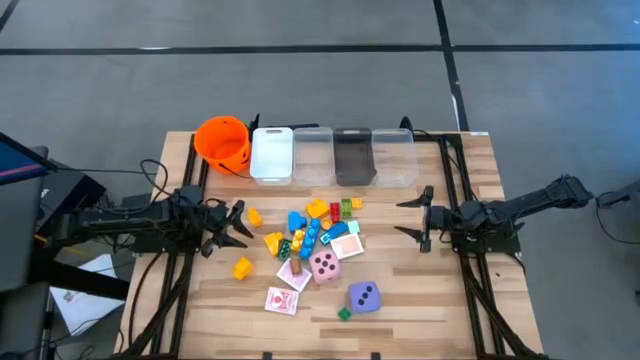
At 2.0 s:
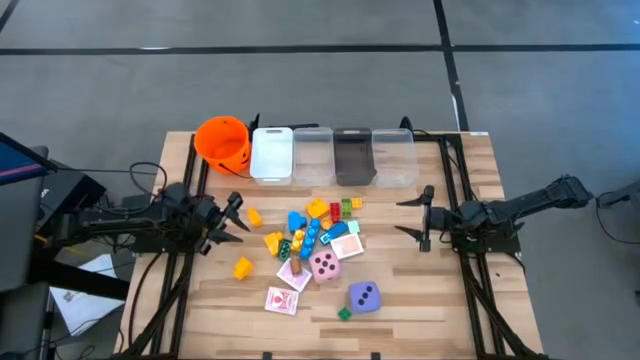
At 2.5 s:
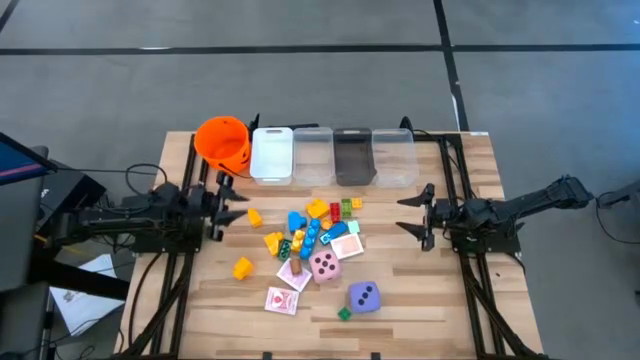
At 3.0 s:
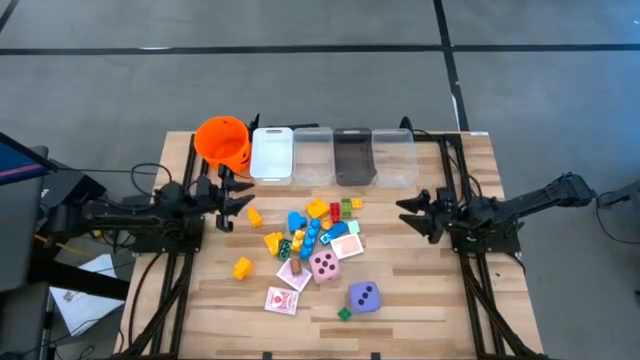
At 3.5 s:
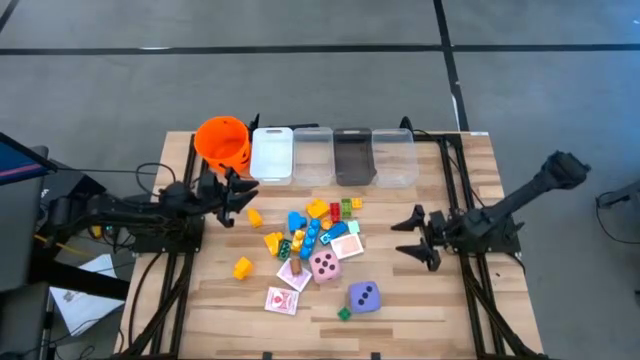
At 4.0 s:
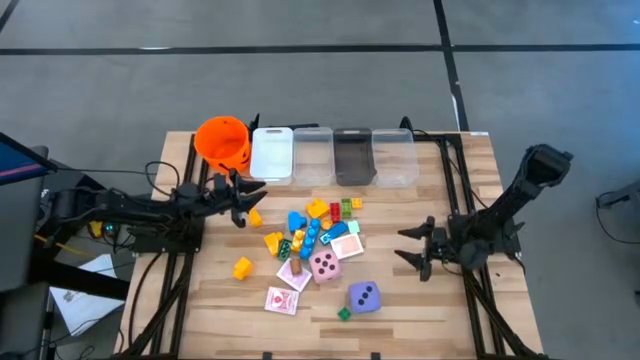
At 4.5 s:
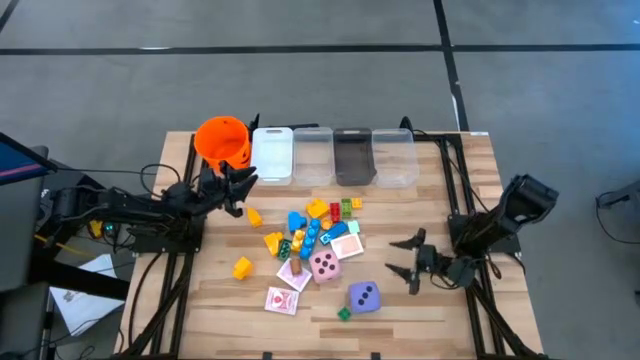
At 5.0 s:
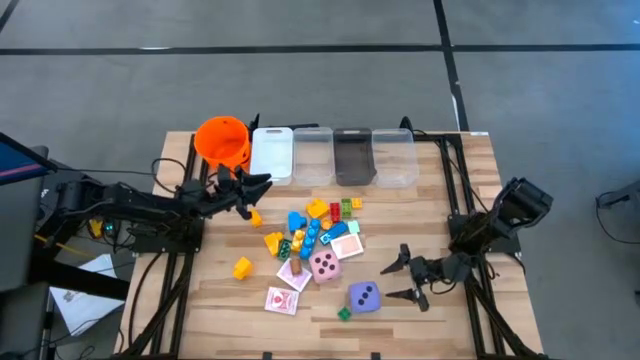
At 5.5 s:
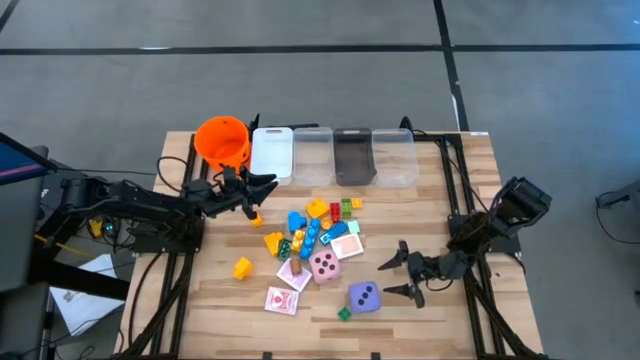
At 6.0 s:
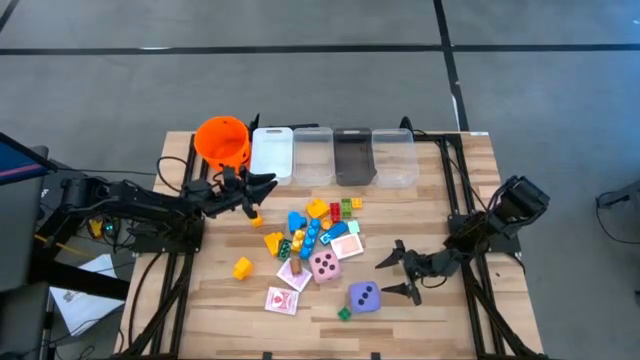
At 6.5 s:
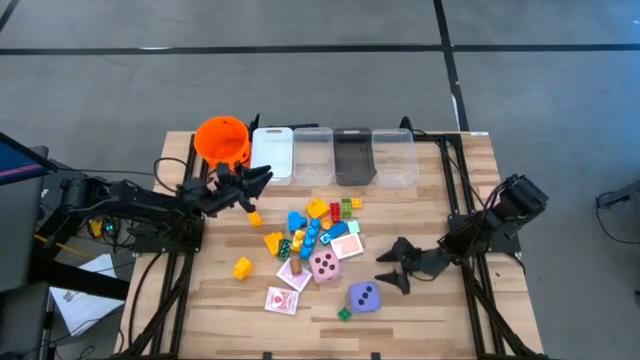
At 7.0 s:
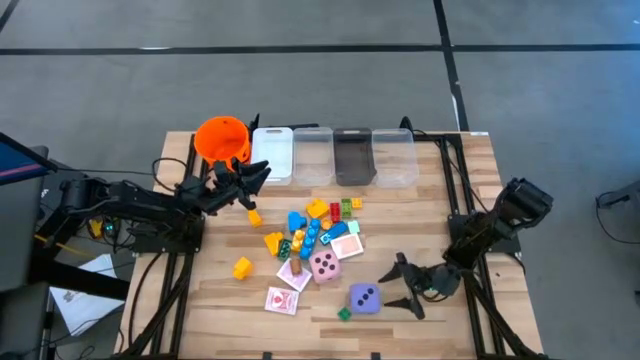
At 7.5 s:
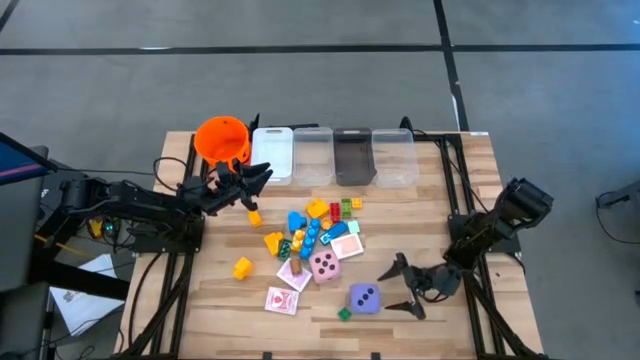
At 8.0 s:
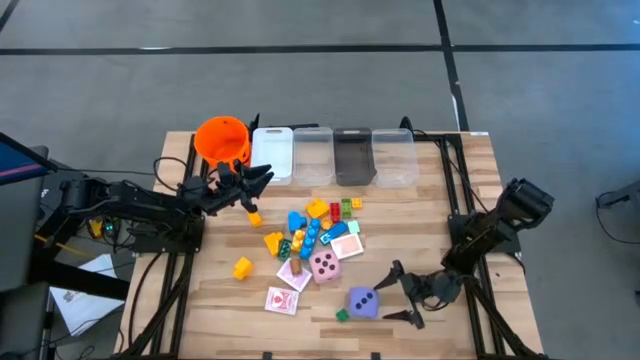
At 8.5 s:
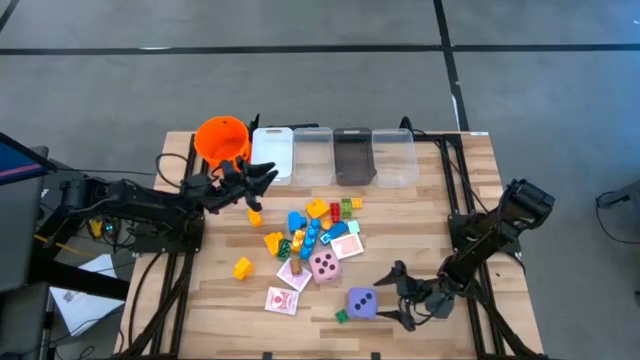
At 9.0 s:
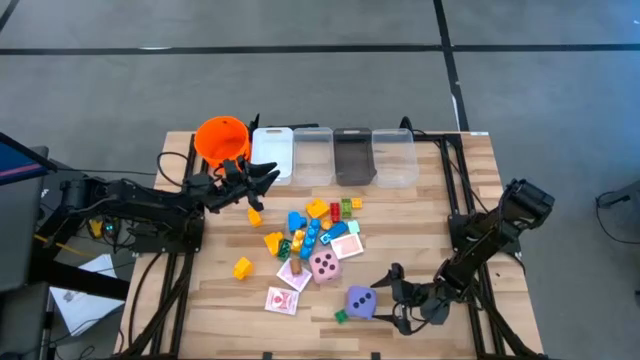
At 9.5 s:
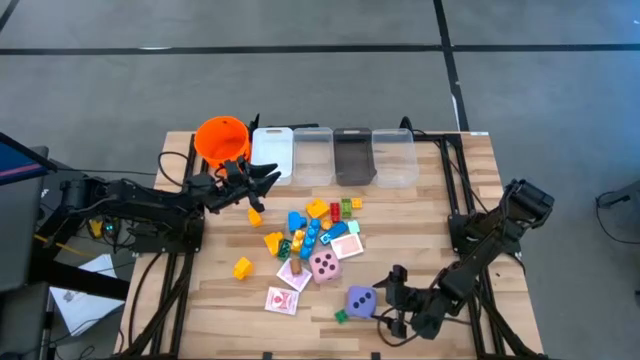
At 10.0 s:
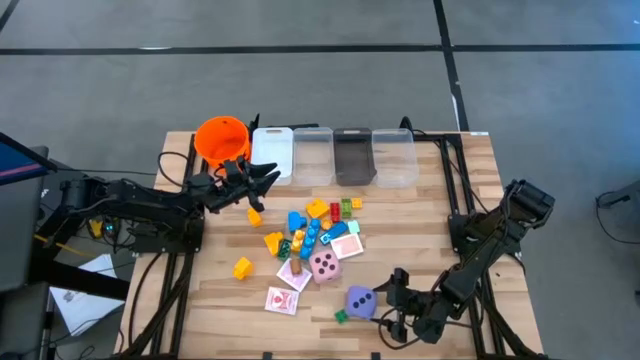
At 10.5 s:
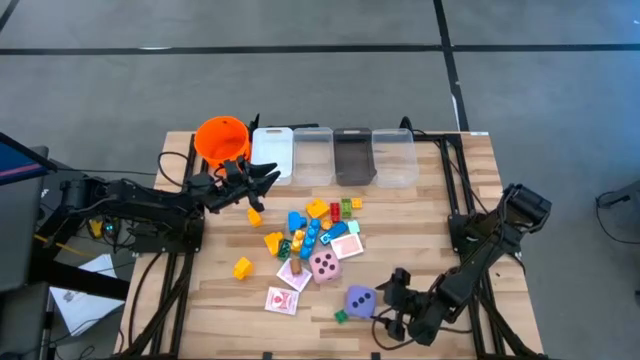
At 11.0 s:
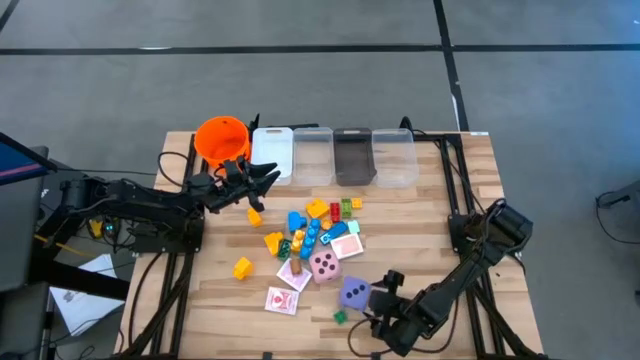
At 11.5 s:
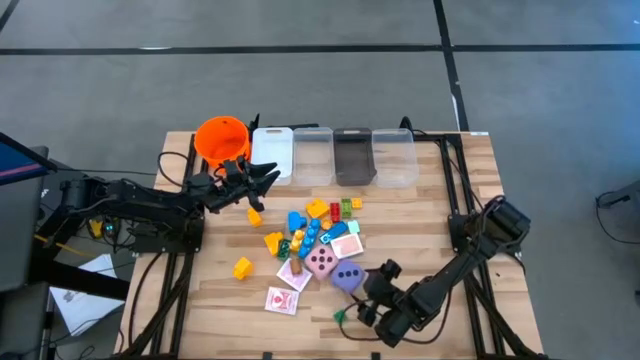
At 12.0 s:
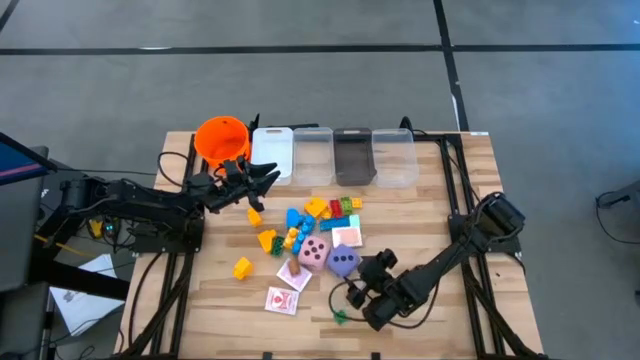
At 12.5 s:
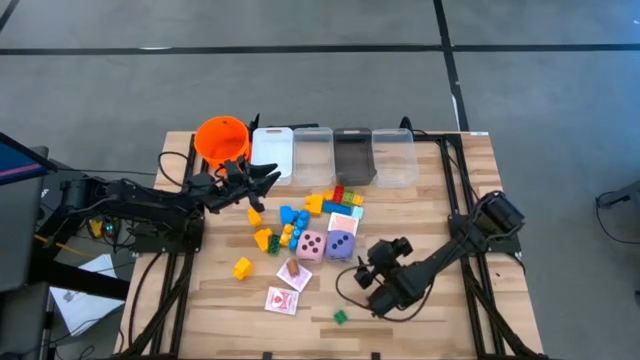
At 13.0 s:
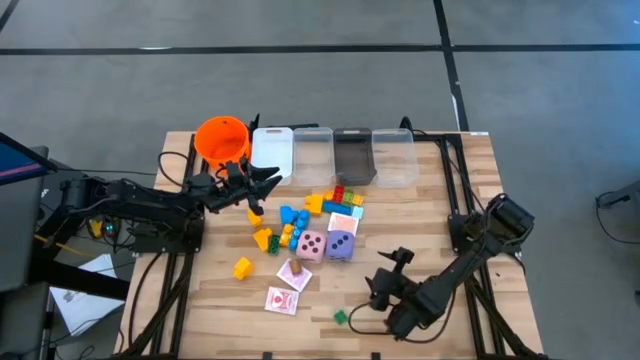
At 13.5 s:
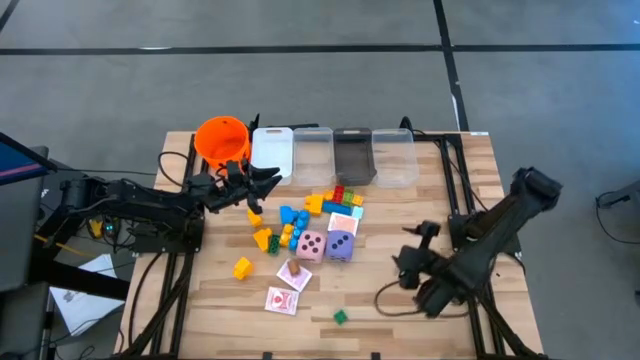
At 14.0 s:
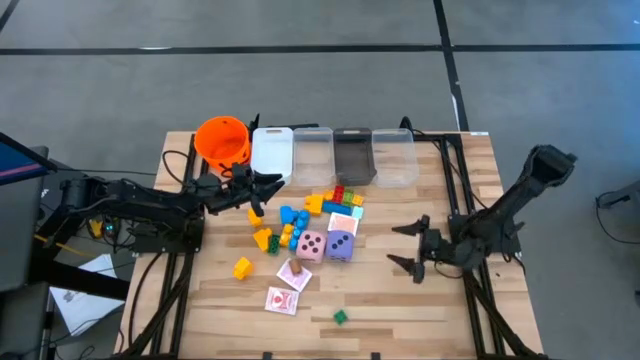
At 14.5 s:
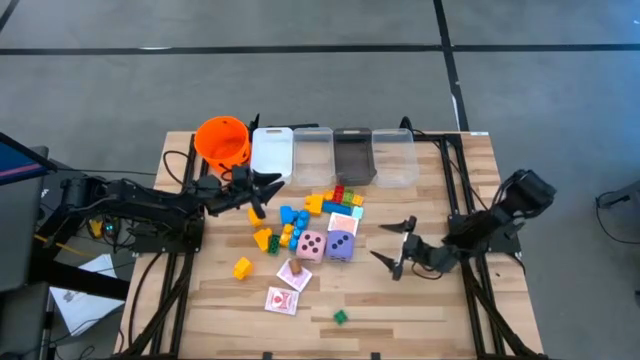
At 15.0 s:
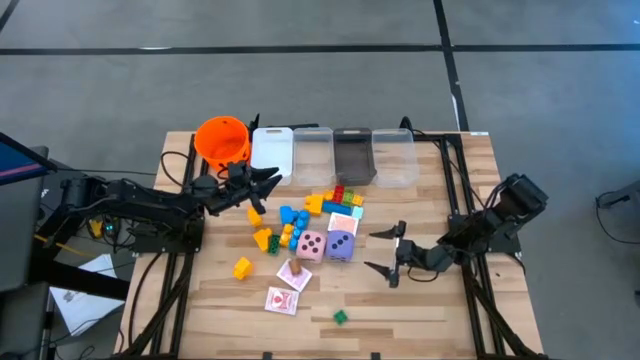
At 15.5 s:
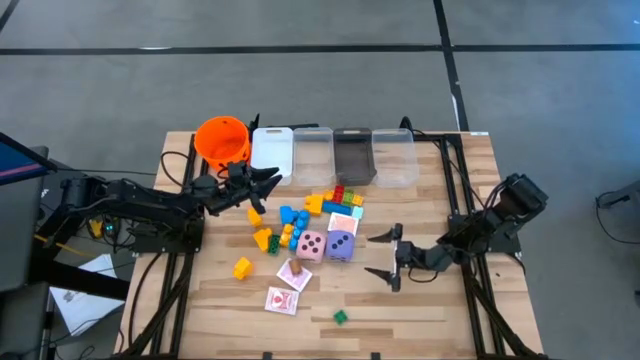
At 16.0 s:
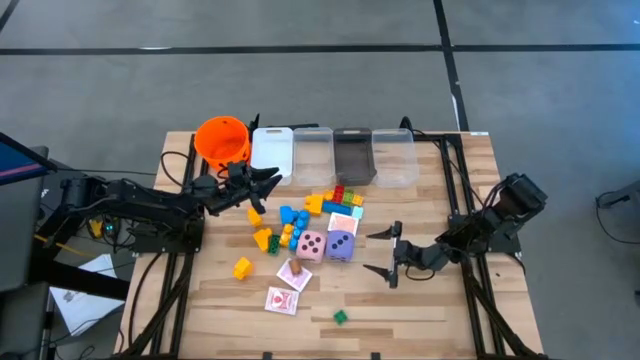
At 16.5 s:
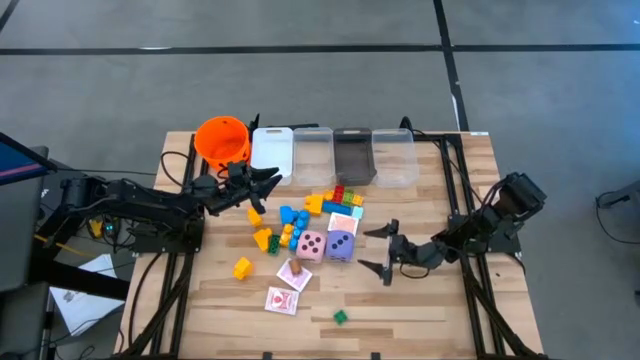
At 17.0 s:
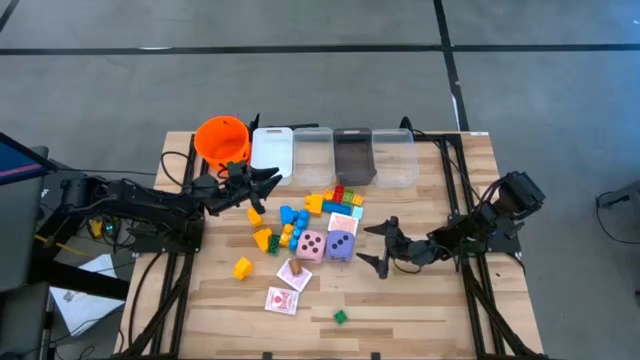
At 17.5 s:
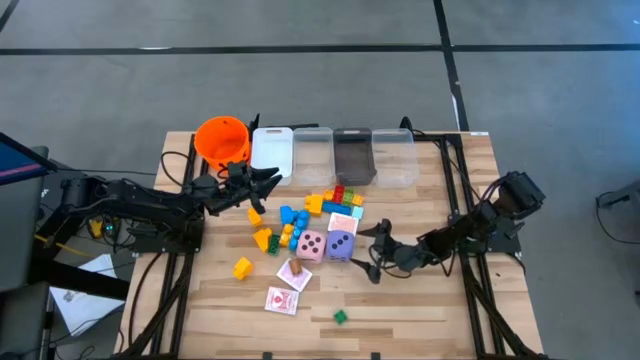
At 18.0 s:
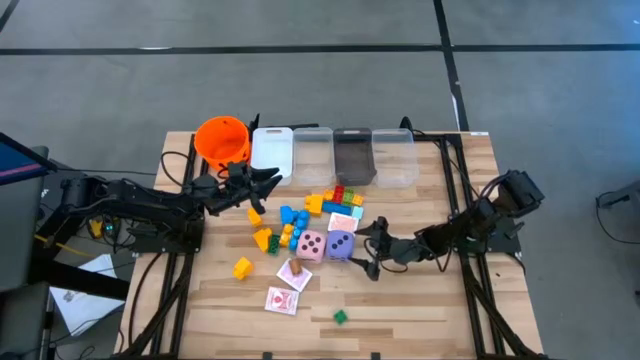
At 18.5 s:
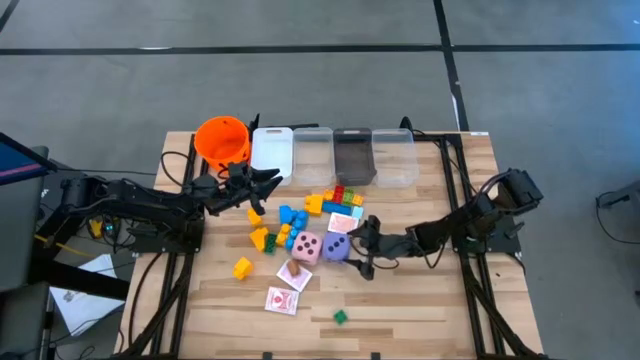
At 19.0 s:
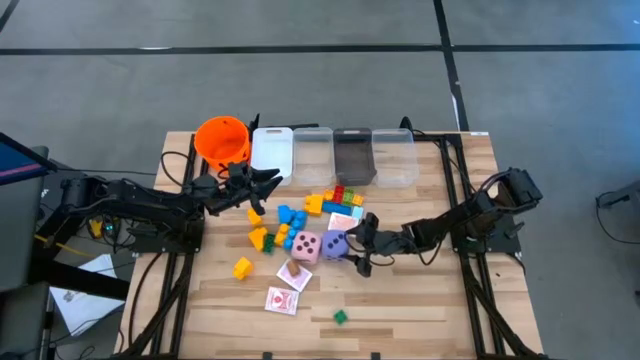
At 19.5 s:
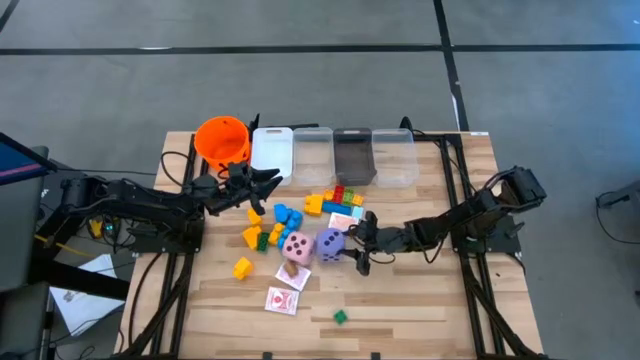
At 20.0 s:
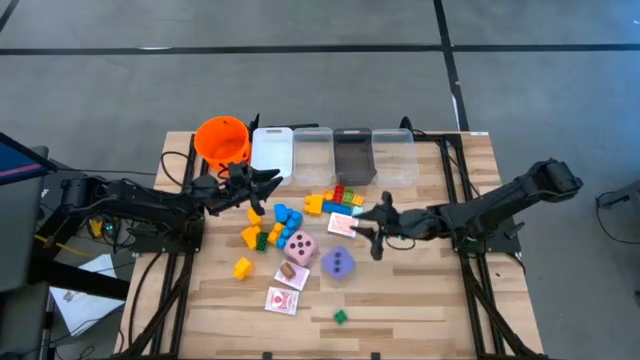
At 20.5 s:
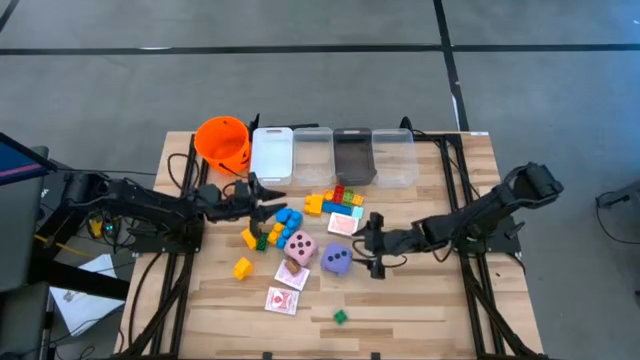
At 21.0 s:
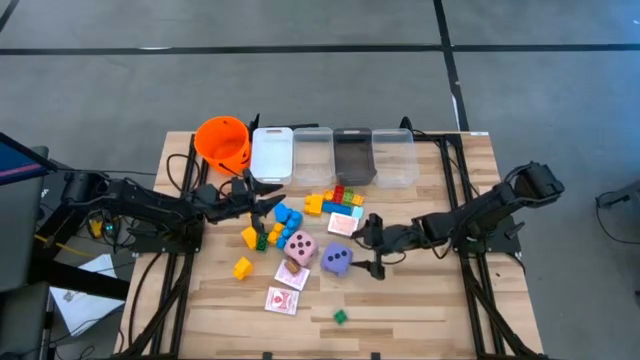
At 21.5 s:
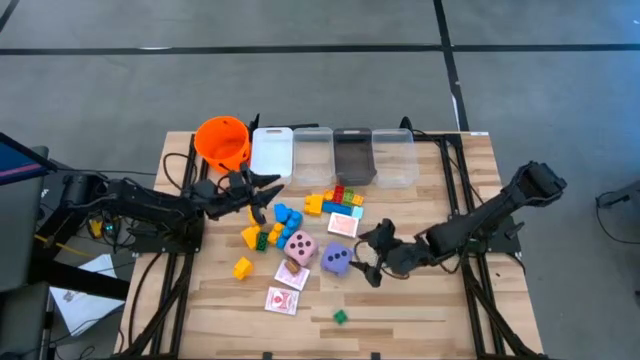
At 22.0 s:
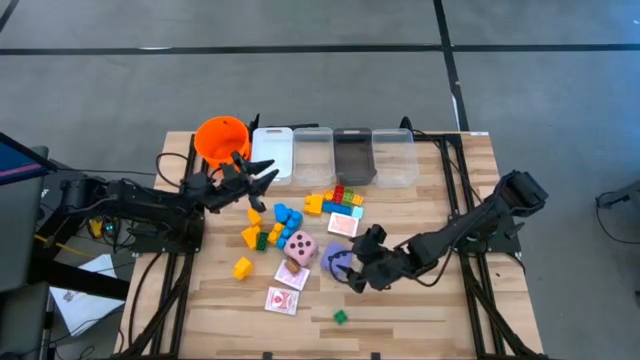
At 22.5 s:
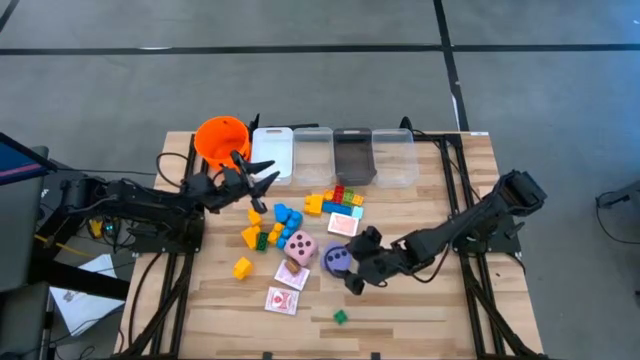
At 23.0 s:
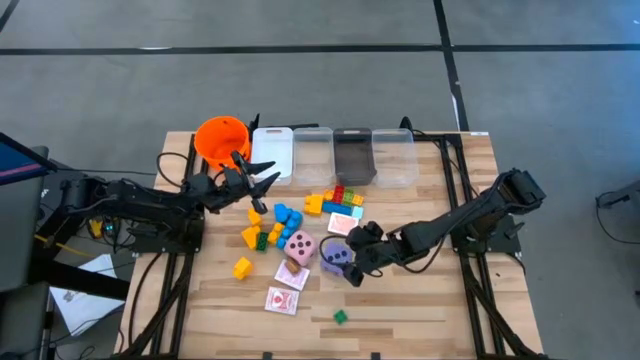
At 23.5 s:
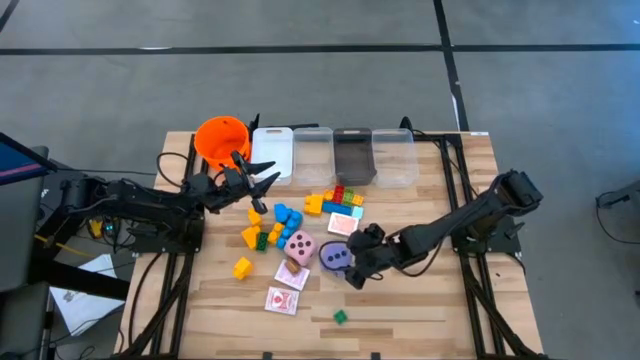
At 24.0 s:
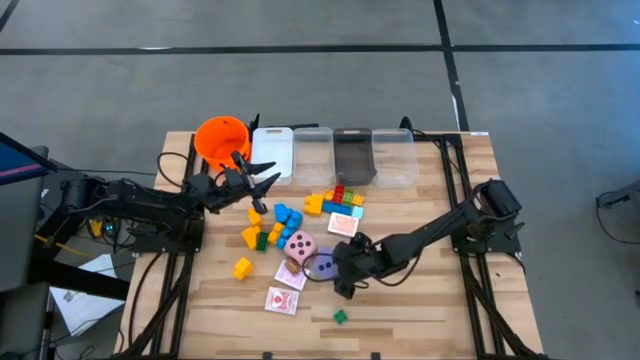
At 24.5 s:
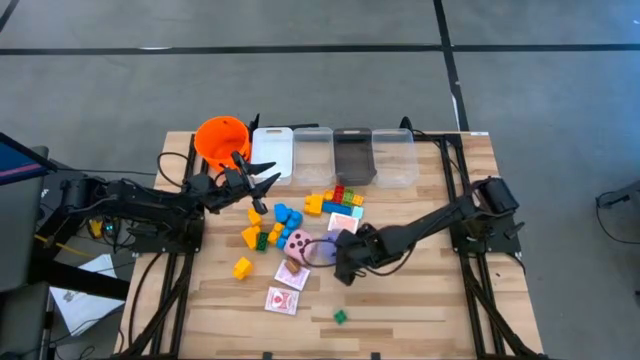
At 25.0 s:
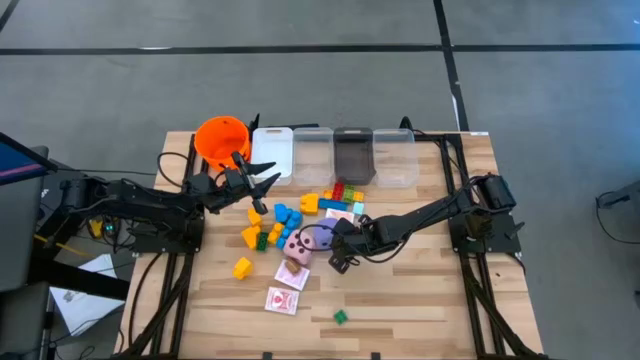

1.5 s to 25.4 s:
Task: Pick & Place Toys
Put the purple dice into the black bin
